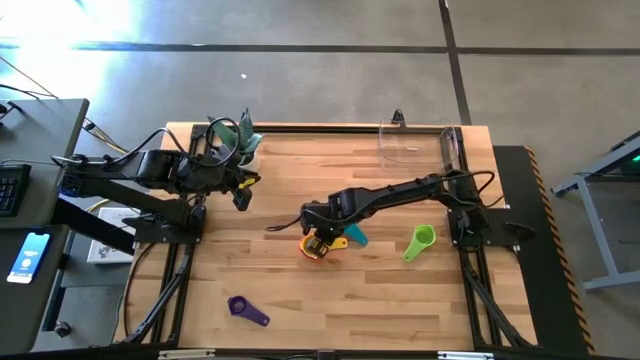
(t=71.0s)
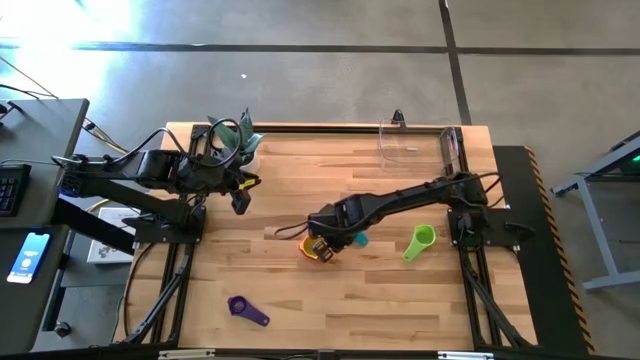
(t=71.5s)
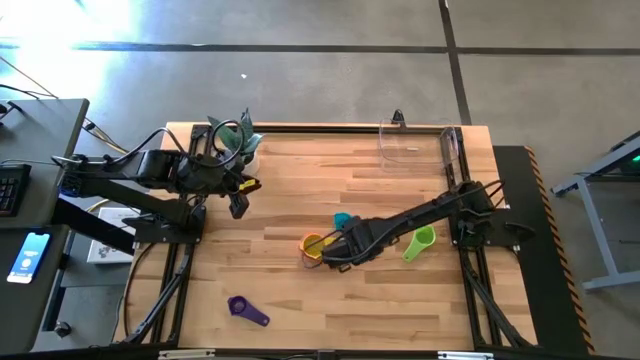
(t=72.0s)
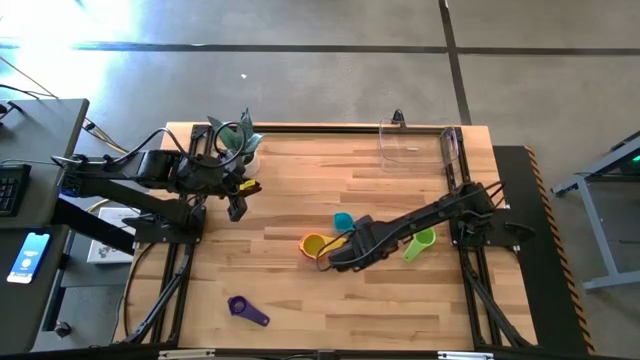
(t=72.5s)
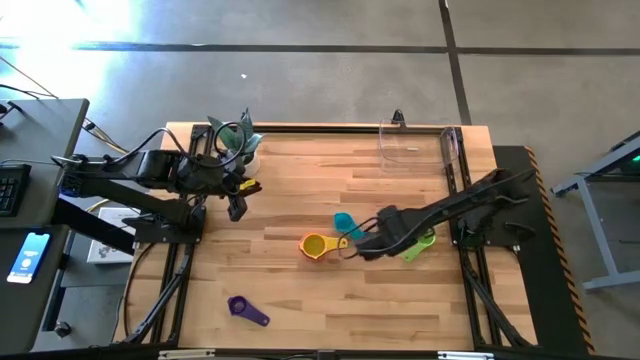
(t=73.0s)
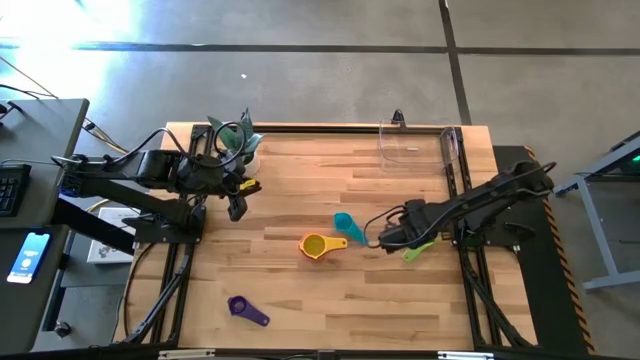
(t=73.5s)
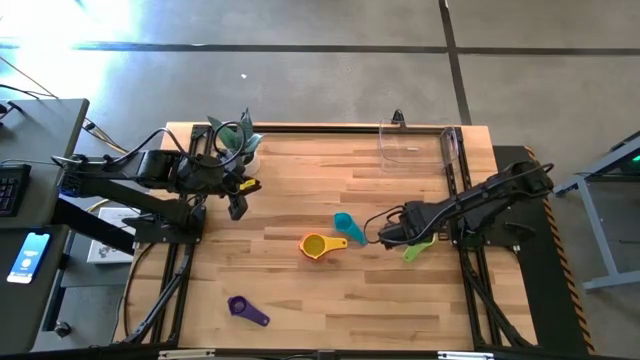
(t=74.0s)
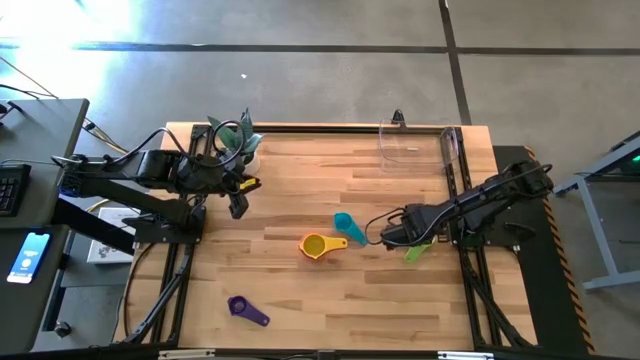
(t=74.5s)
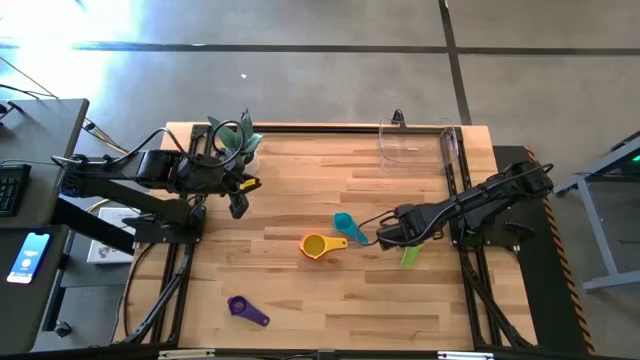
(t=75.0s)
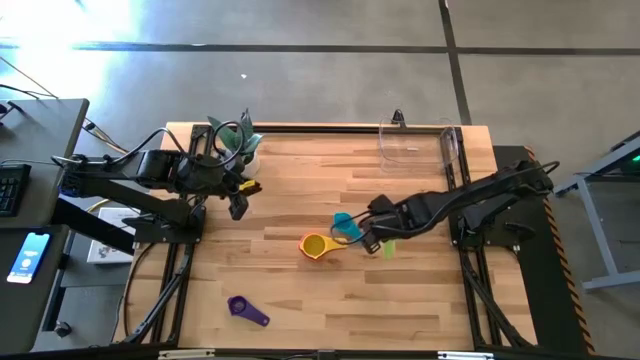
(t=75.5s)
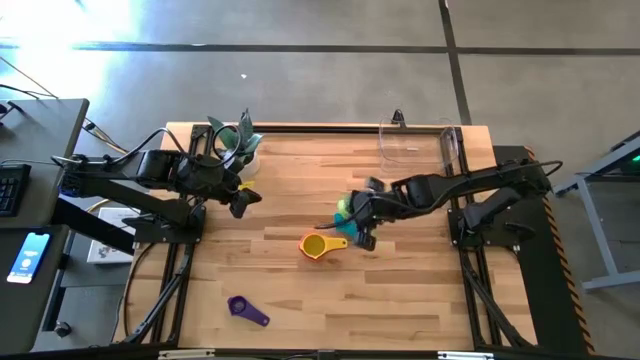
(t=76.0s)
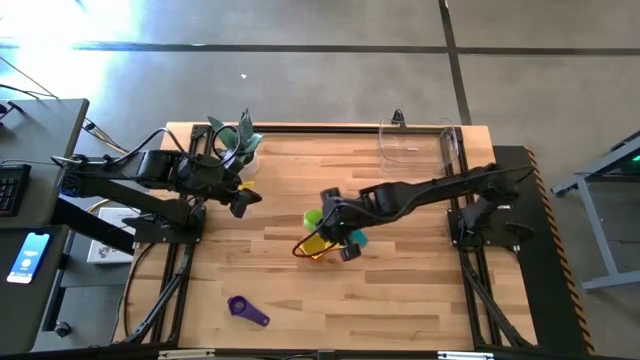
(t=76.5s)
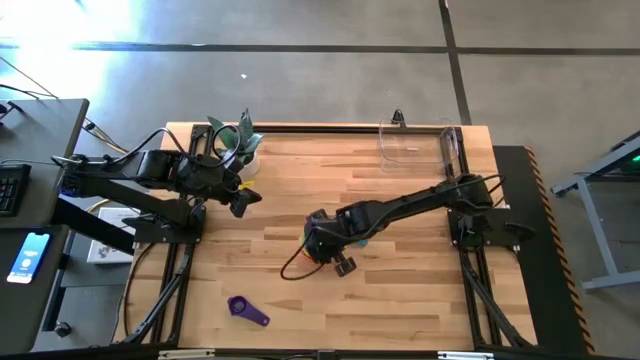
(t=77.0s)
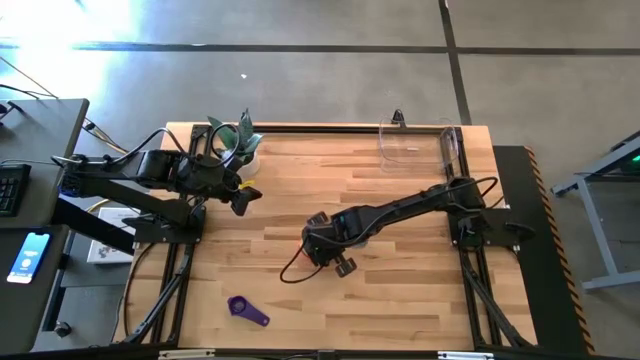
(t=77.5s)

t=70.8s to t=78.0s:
Task: Nest measuring cups in basket
Stack the green measuring cup on top of the yellow measuring cup

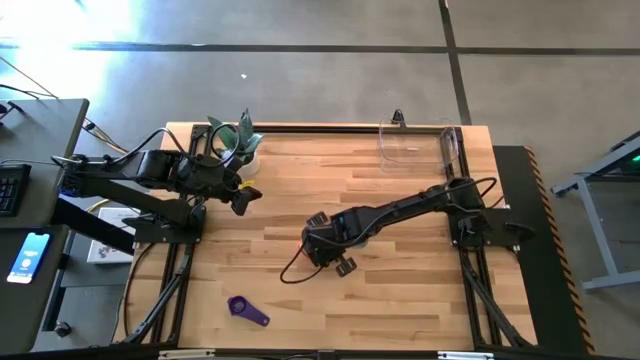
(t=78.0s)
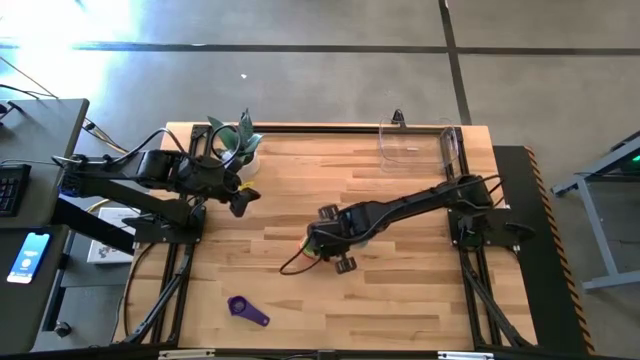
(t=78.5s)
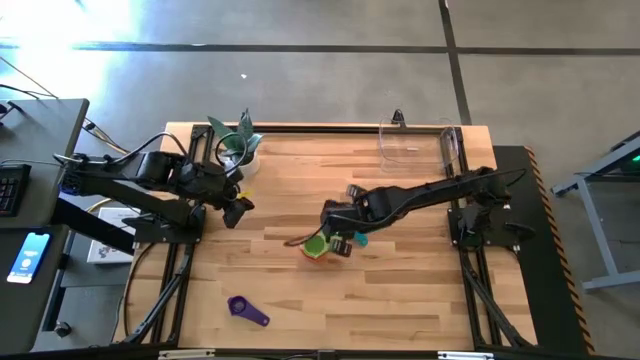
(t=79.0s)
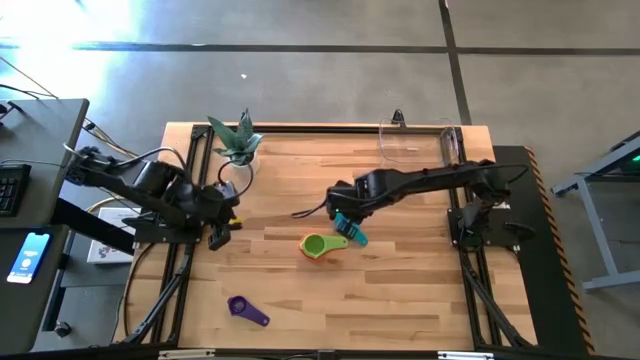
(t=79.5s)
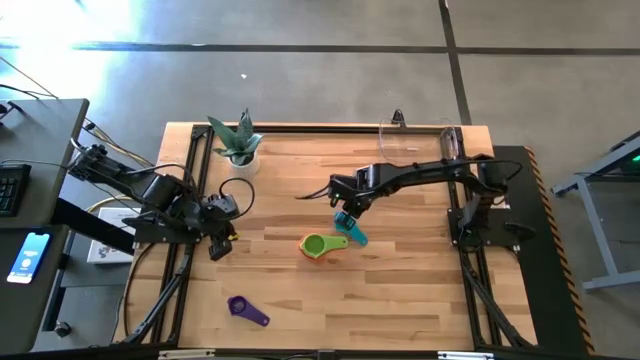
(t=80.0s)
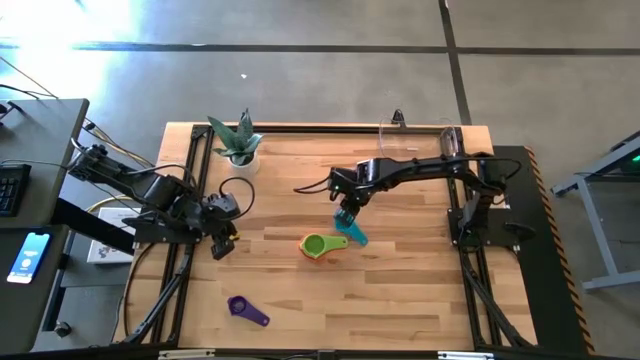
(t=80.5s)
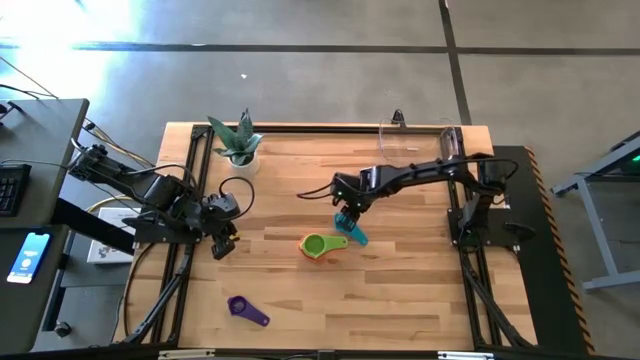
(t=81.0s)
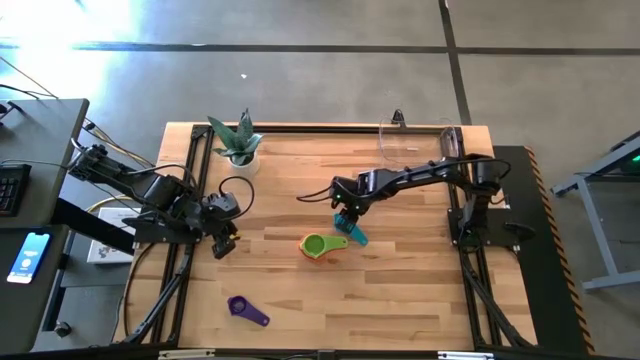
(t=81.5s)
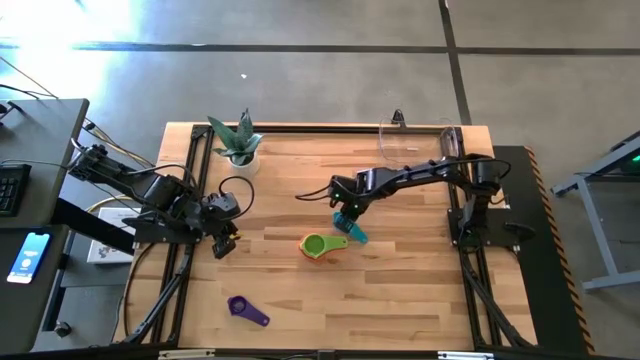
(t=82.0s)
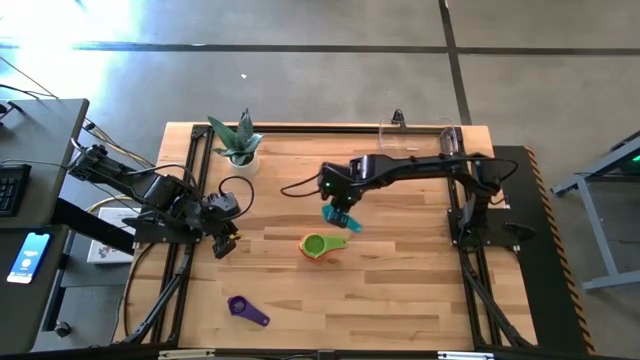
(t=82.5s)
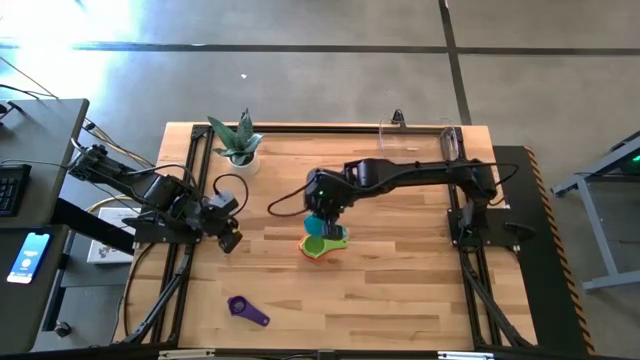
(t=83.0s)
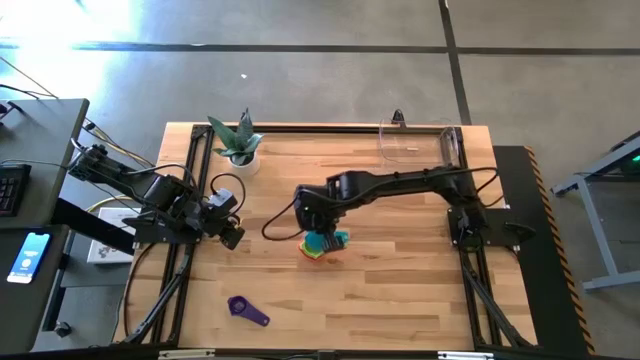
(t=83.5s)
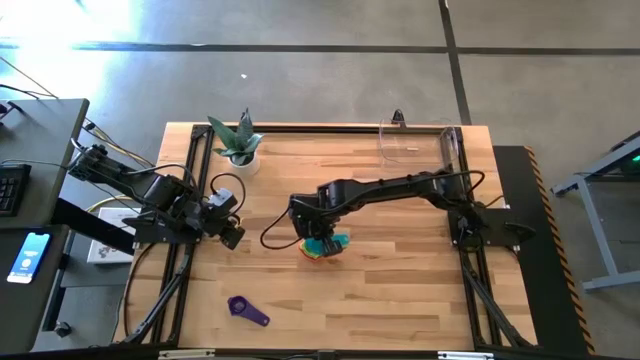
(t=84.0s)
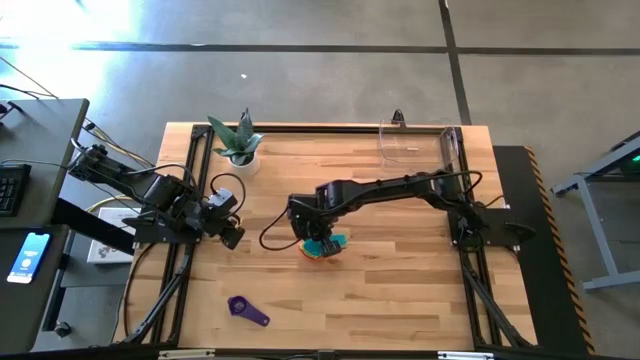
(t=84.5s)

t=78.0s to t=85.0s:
Stack the light blue measuring cup on top of the green measuring cup

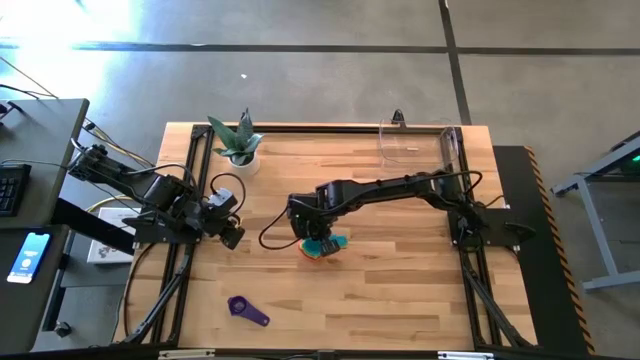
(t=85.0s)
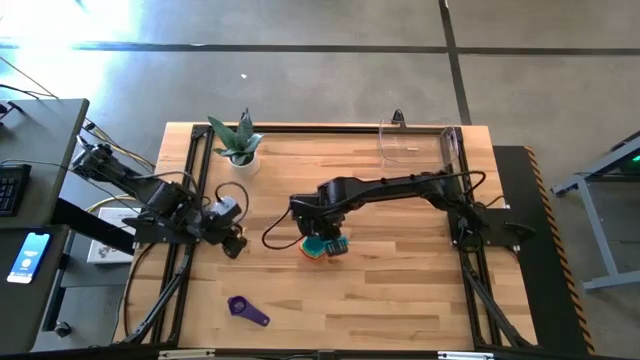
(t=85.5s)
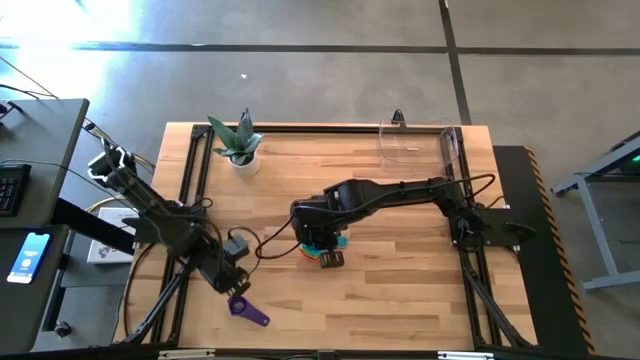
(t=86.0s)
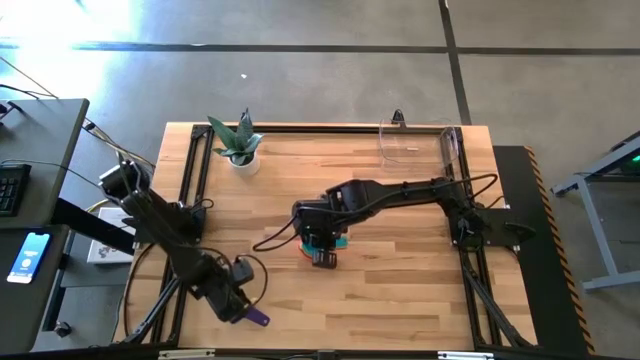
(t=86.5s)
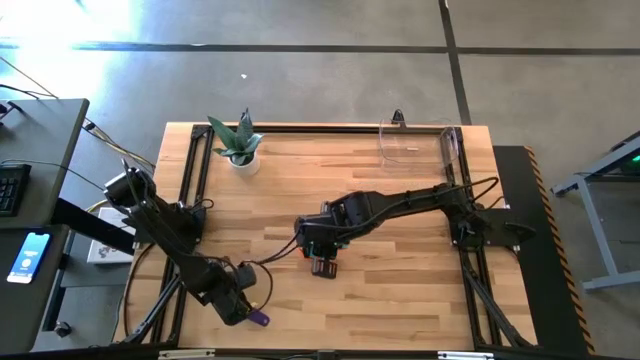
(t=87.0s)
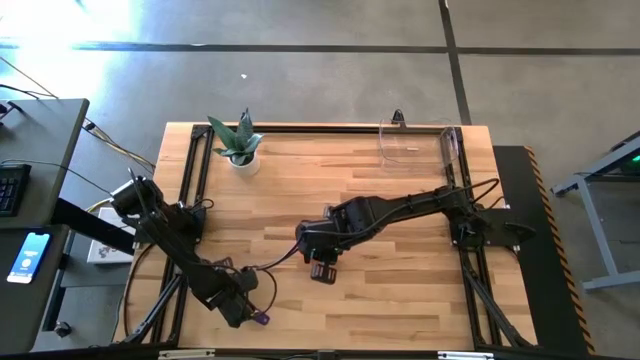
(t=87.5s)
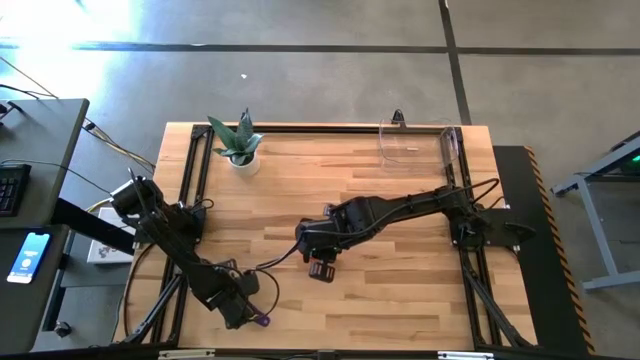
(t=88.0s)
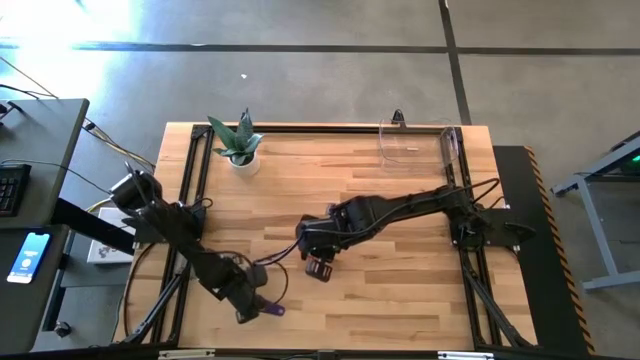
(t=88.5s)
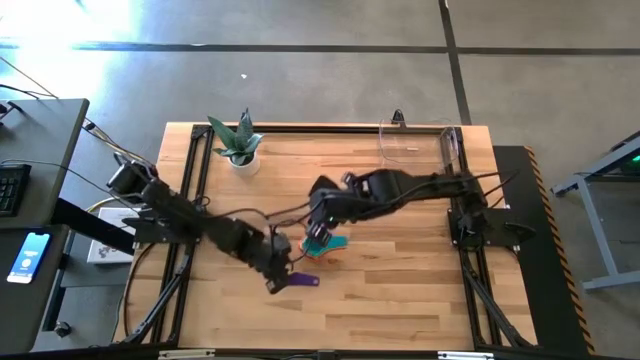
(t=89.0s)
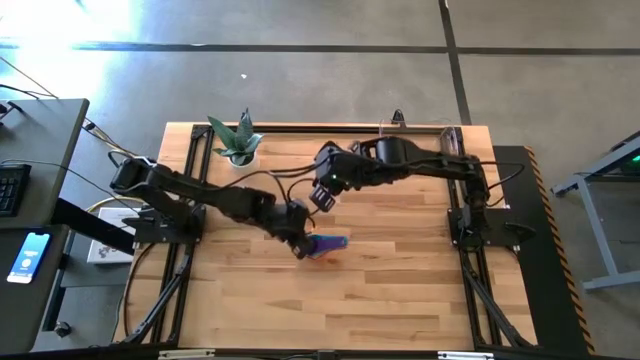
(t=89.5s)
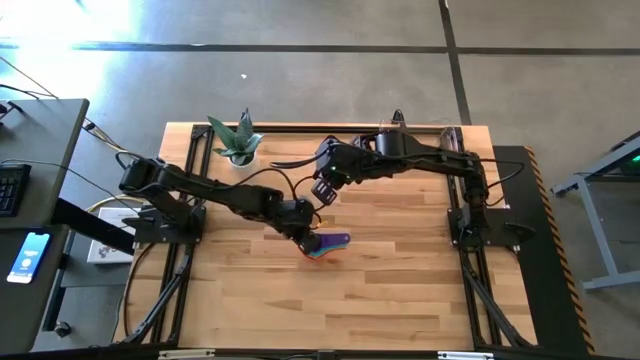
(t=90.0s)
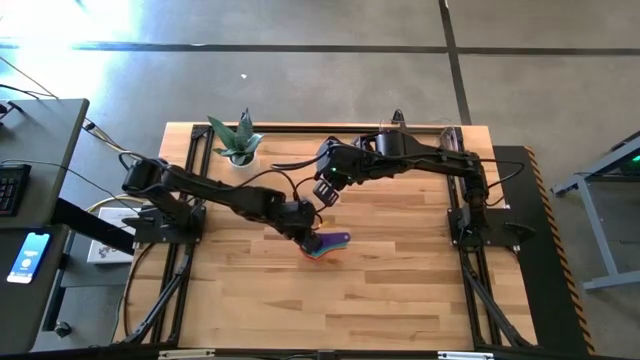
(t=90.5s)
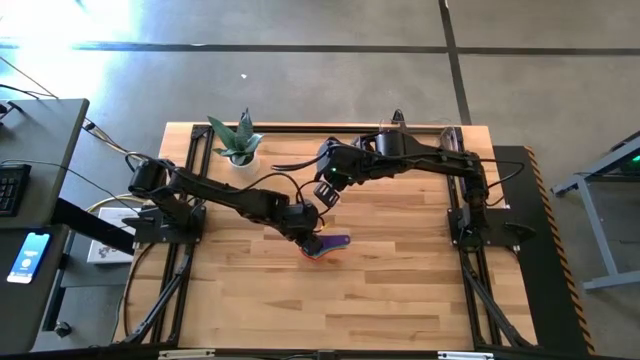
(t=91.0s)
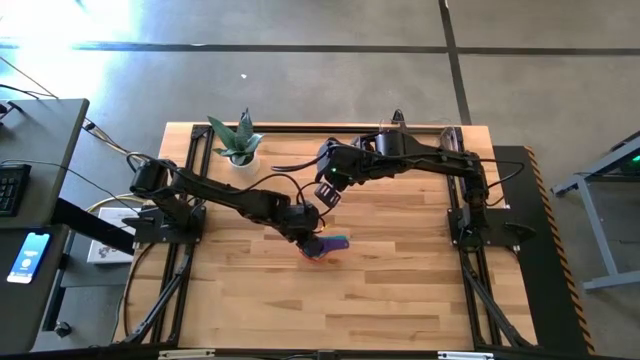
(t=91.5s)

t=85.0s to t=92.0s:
Stack the violet measuring cup on top of the light blue measuring cup
